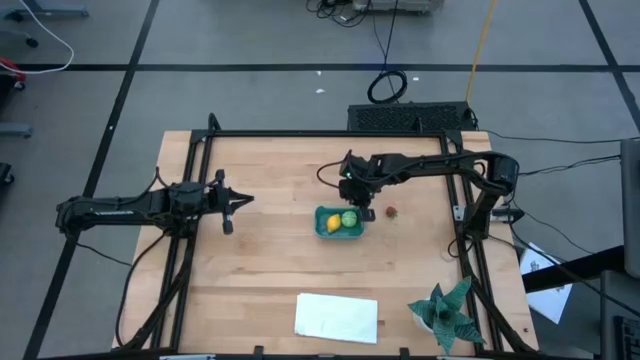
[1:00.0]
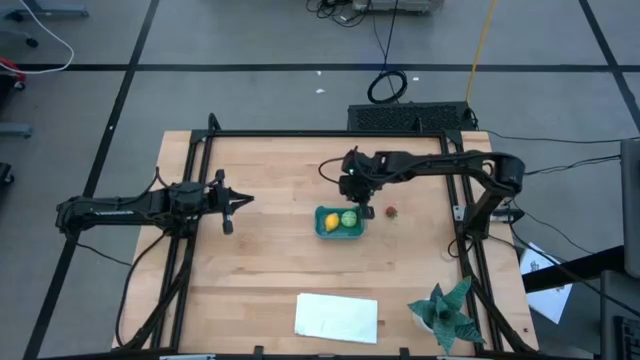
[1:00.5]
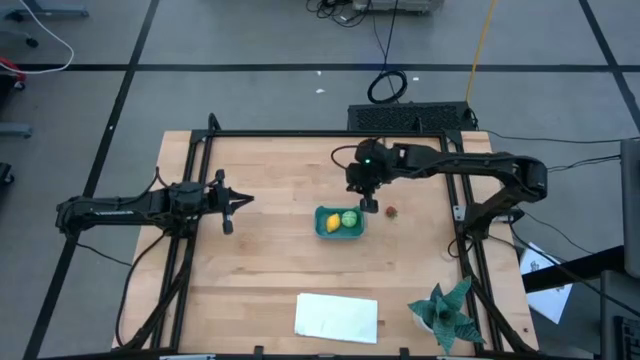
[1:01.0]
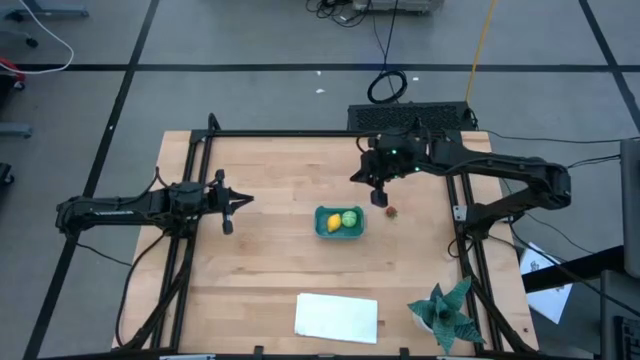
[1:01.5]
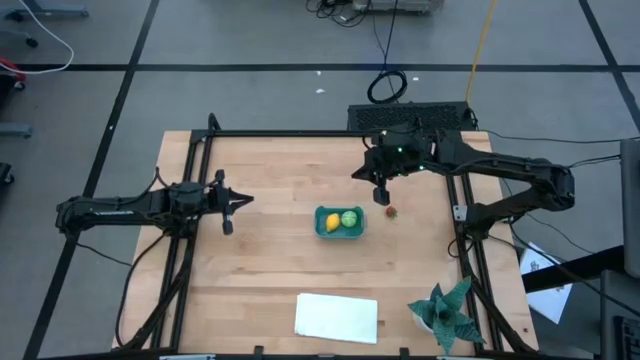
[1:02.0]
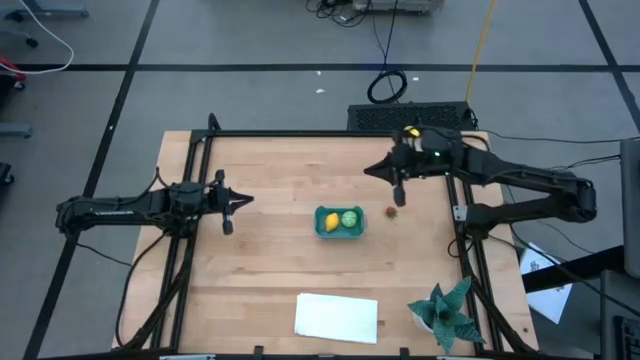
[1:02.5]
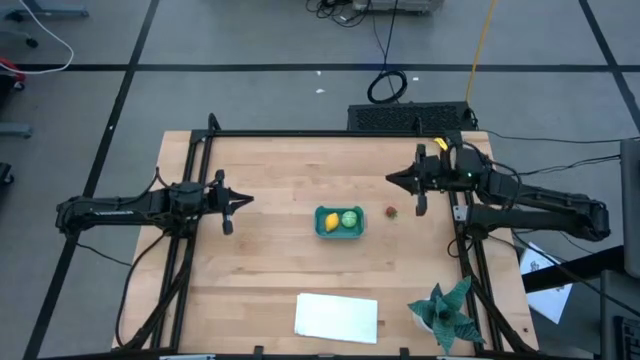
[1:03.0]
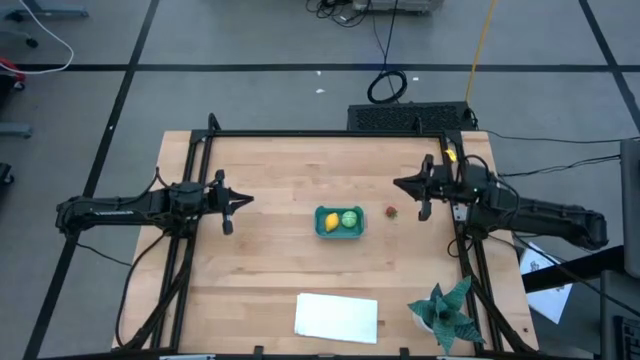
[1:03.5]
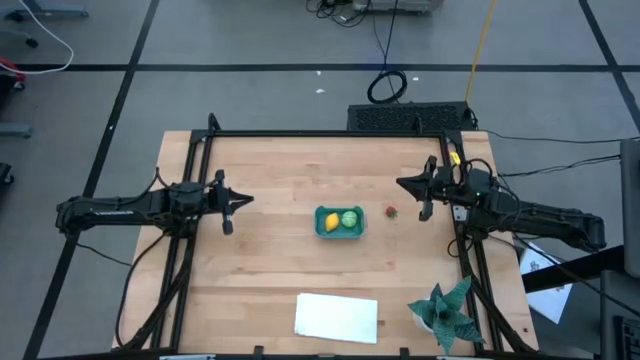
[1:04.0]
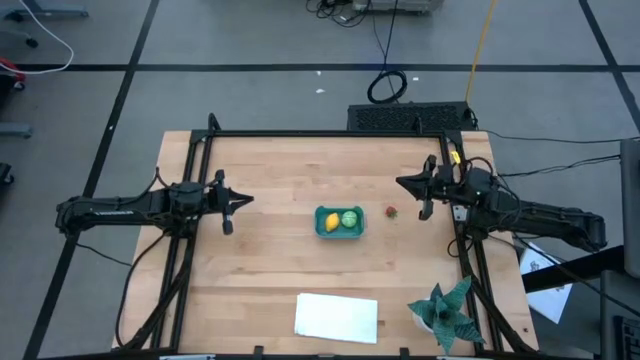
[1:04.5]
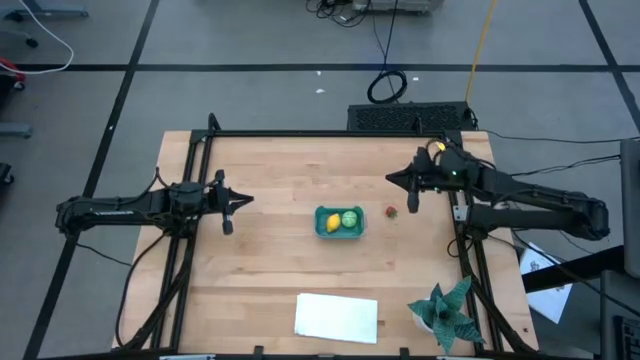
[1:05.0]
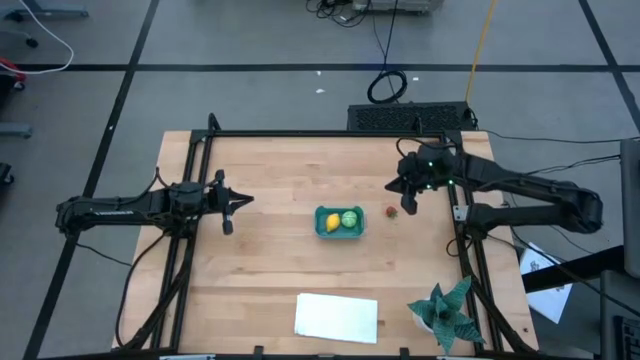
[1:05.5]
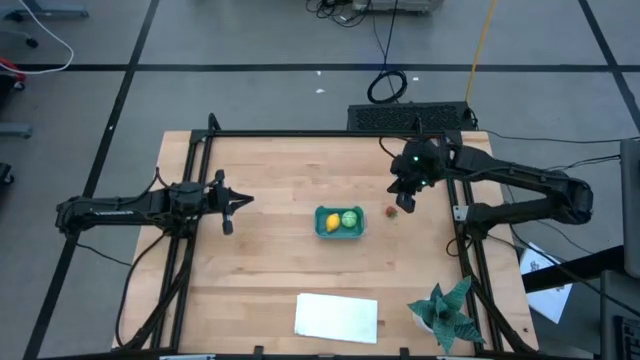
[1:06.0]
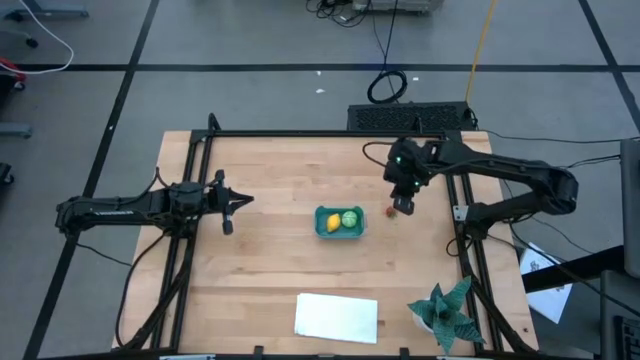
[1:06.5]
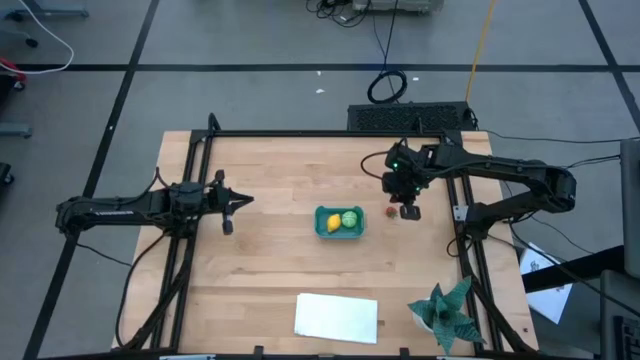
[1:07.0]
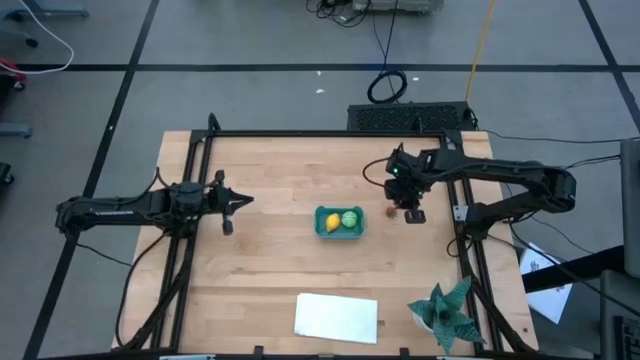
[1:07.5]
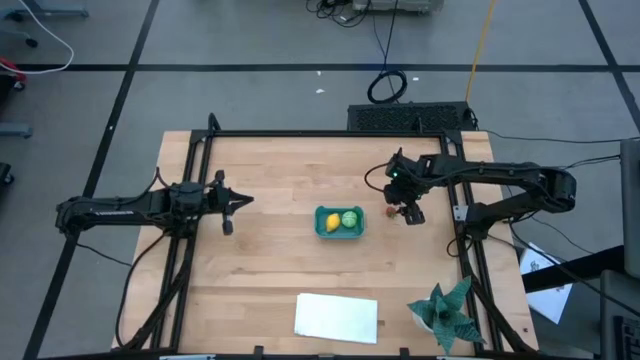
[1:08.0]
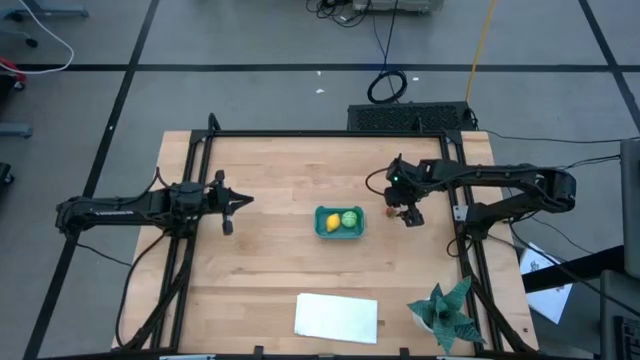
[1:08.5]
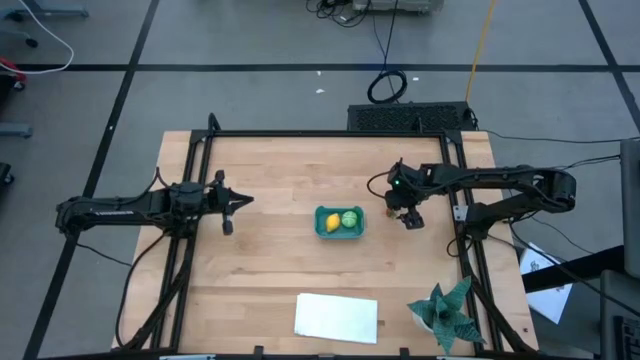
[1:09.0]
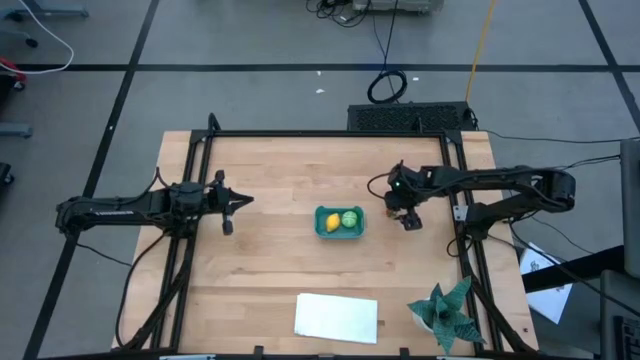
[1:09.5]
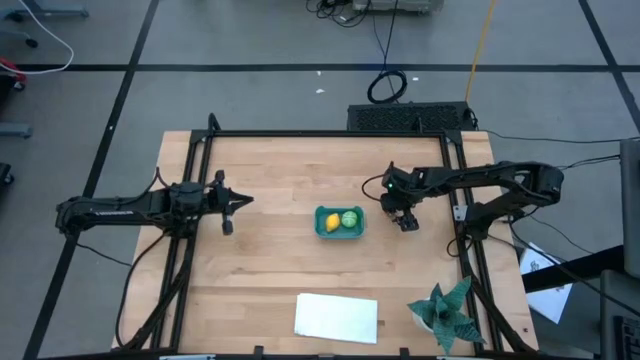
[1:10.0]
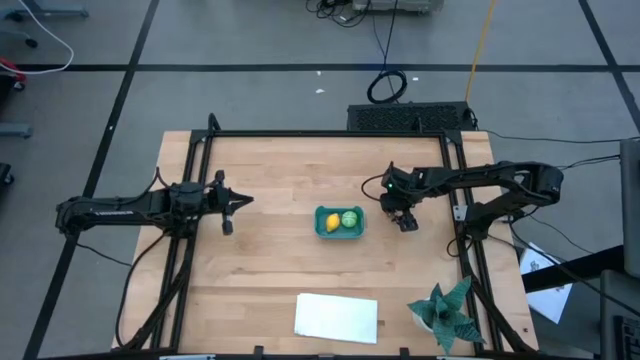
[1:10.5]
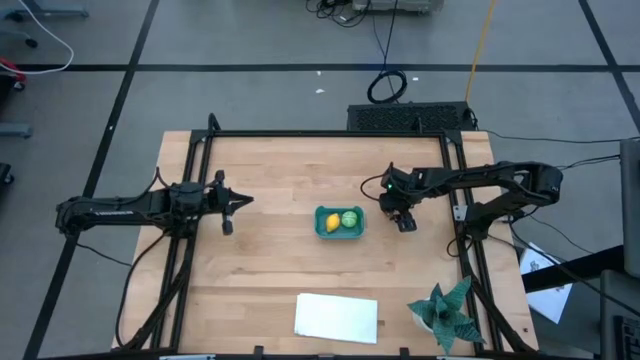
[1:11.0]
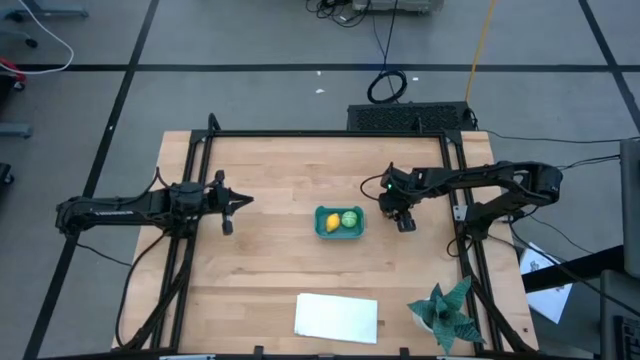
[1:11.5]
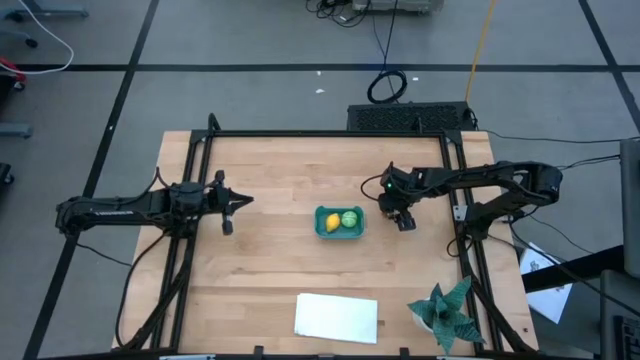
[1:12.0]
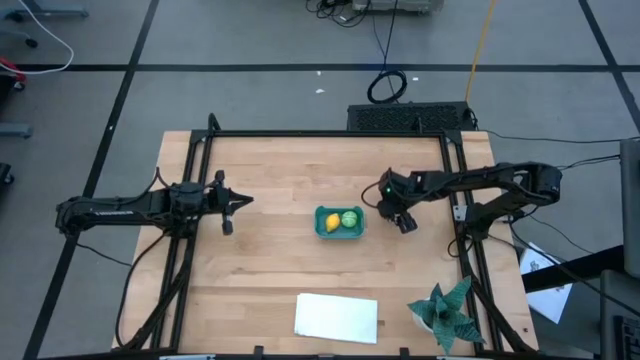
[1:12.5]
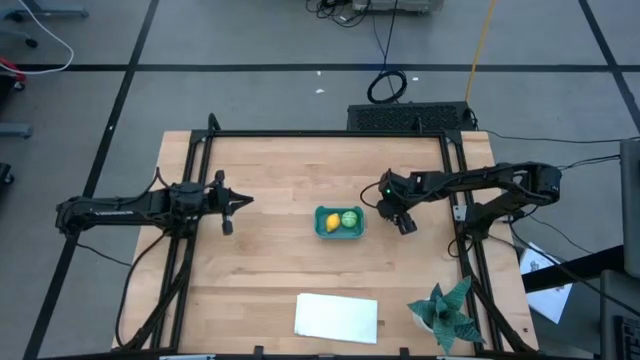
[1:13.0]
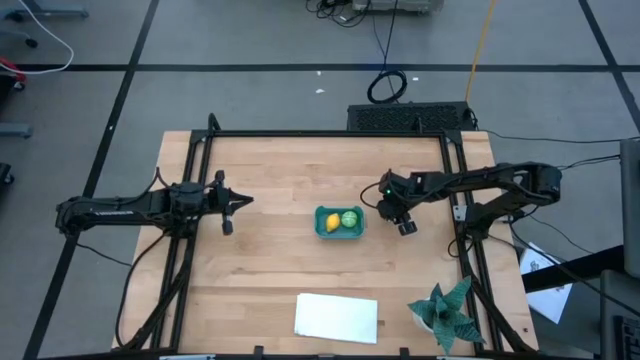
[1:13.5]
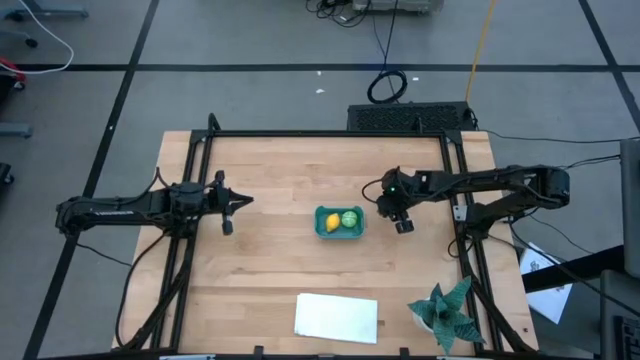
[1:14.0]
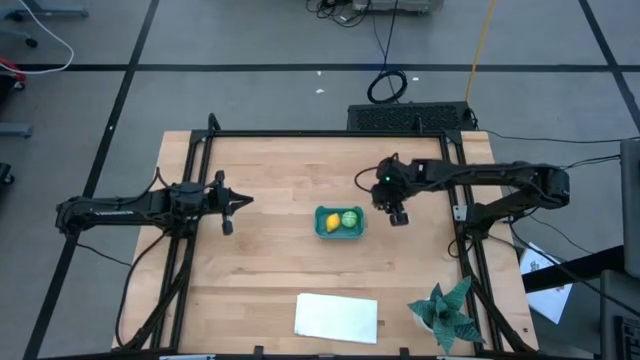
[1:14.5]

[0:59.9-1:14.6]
Task: Pick and placing Produce into tupperware
Put the red strawberry in the bin

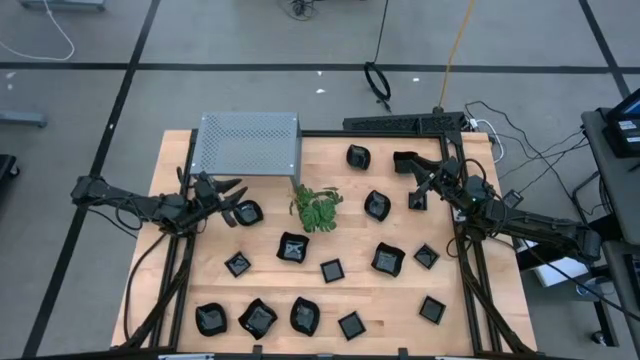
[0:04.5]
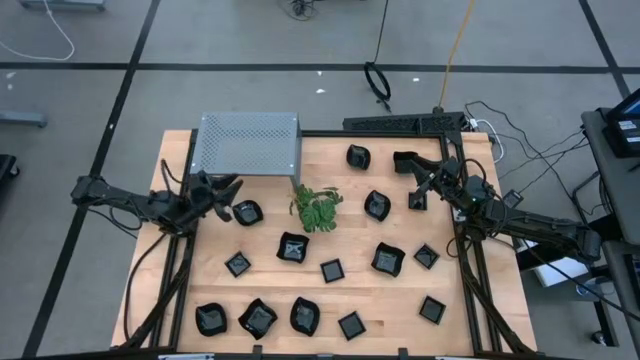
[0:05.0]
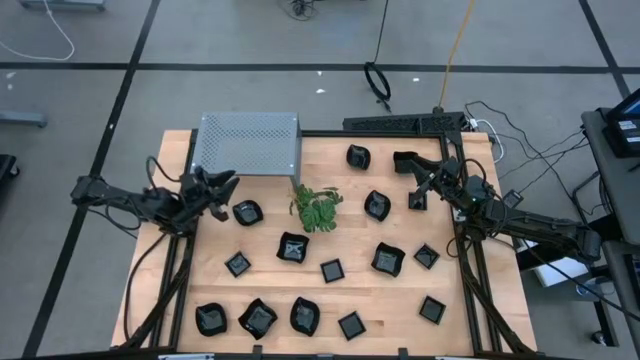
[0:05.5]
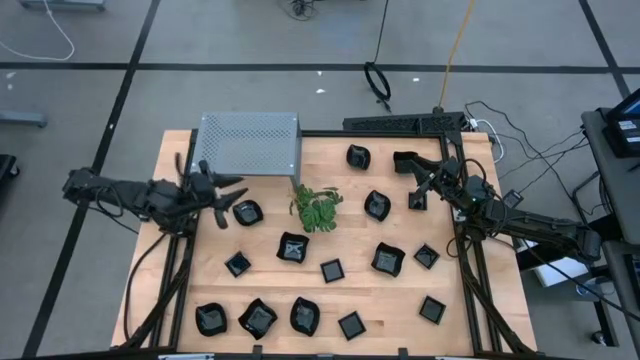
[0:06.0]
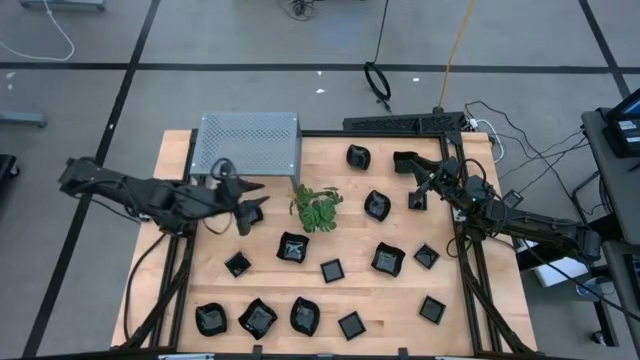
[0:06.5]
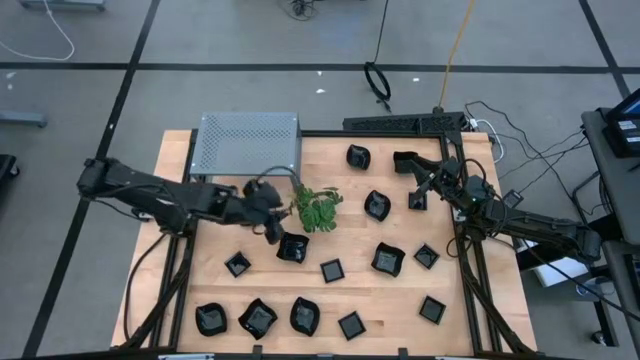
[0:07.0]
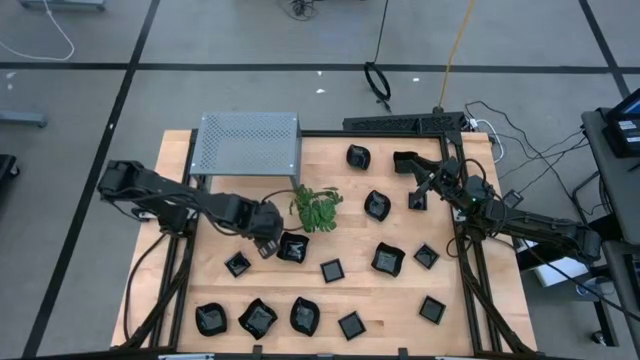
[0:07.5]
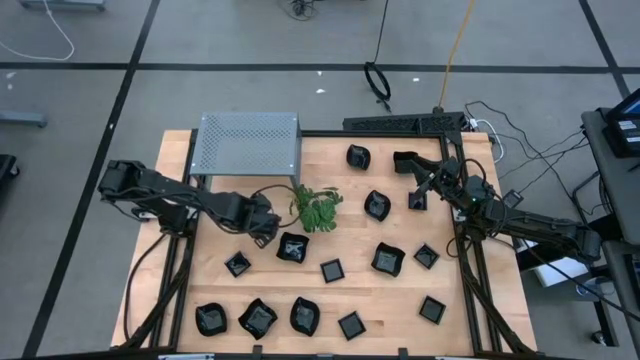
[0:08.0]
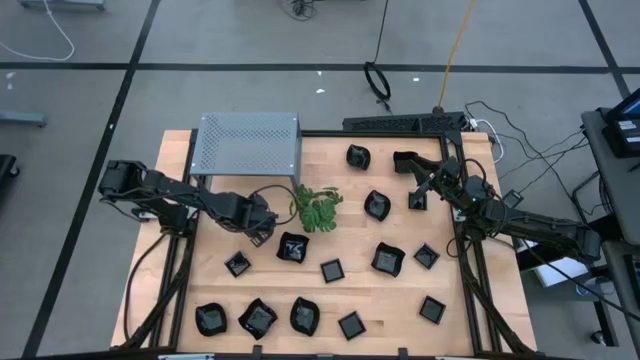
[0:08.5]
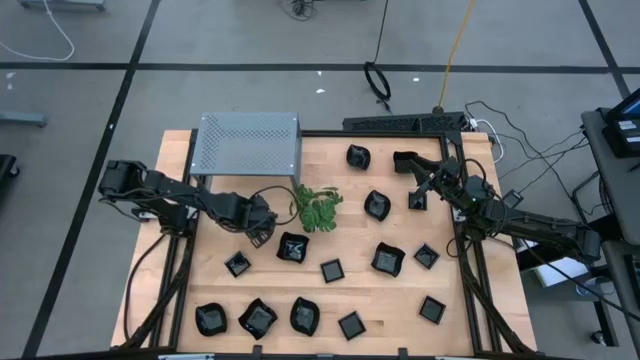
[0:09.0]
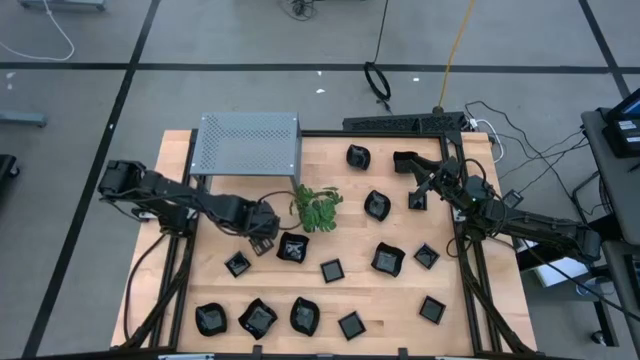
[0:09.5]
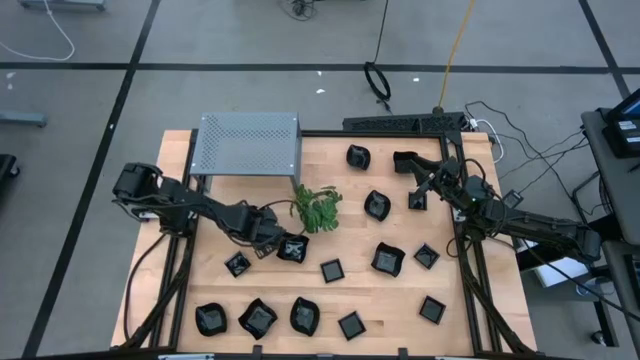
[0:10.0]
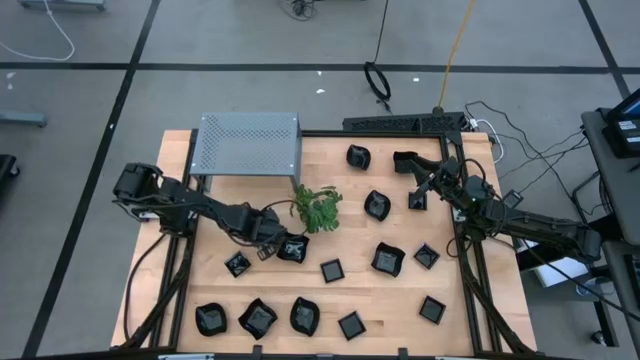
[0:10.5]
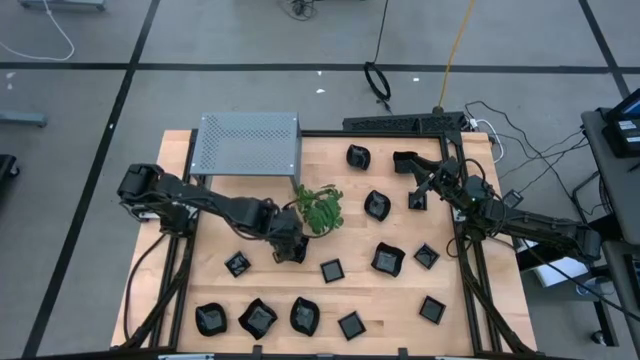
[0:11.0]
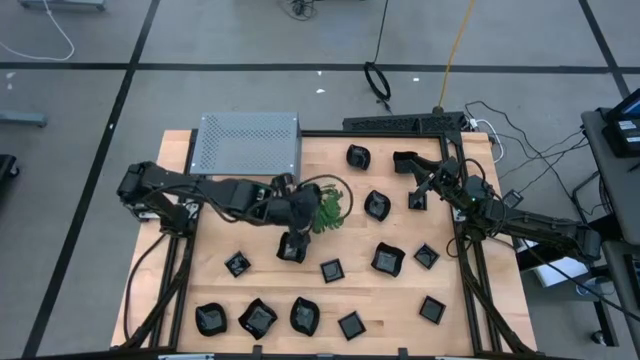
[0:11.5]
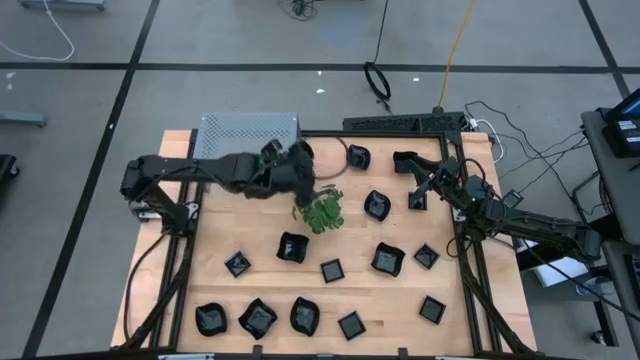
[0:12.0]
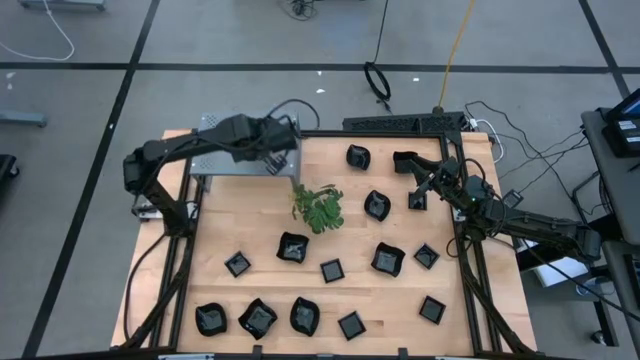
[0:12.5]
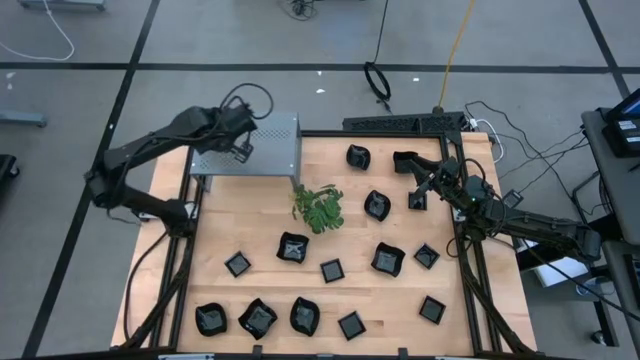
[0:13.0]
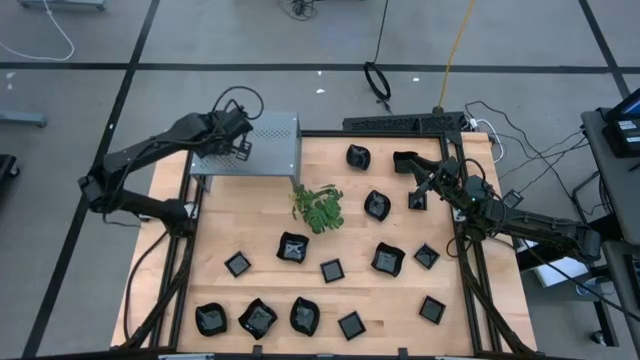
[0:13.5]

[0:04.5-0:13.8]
Task: Pick & Place Mini shaped plates
Put the leaf shaped plate on the shelf
